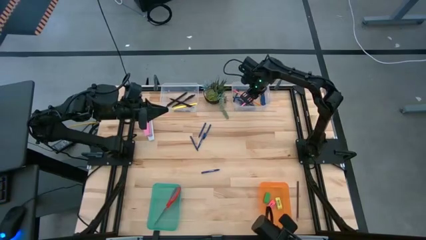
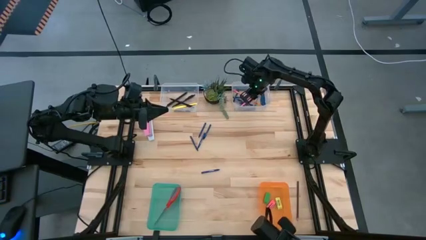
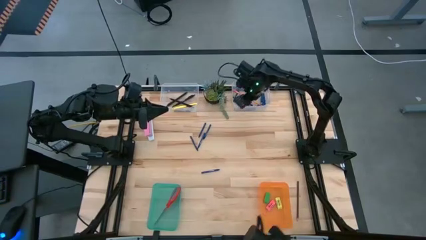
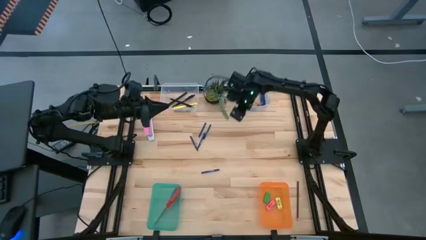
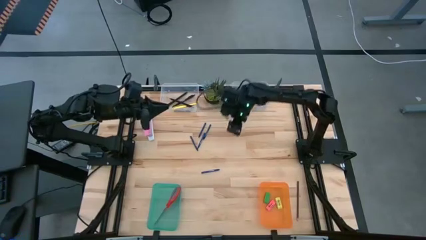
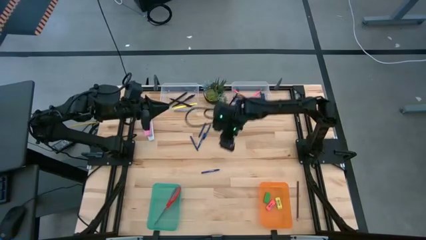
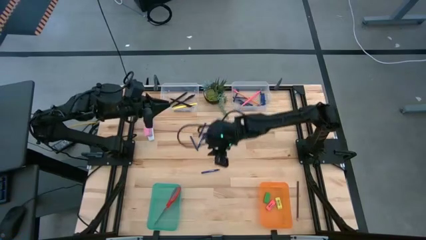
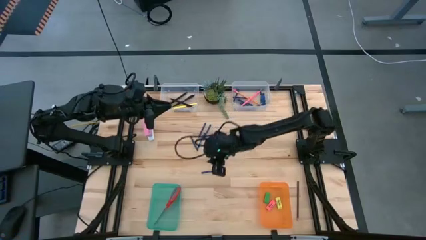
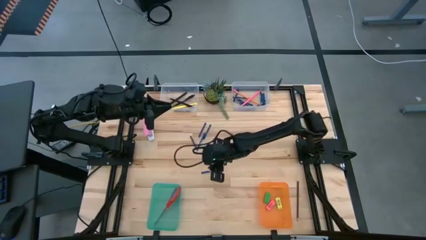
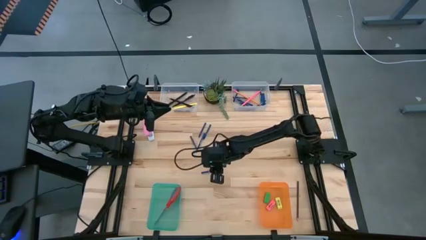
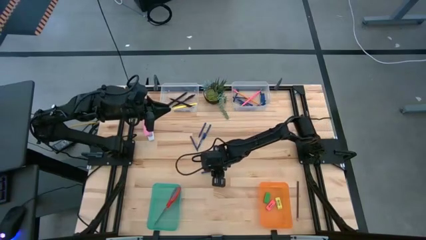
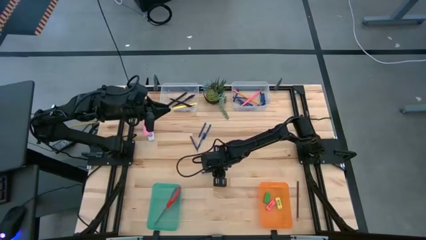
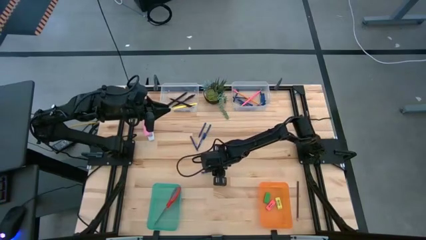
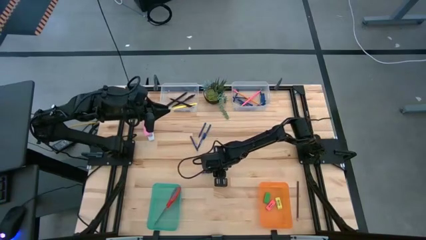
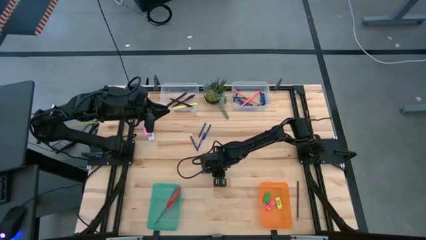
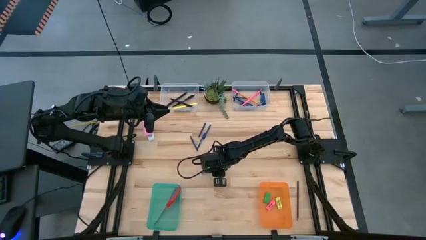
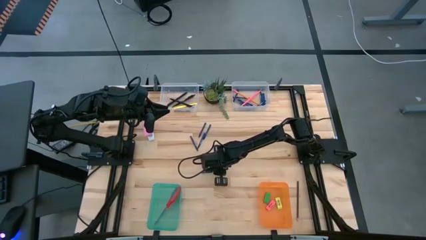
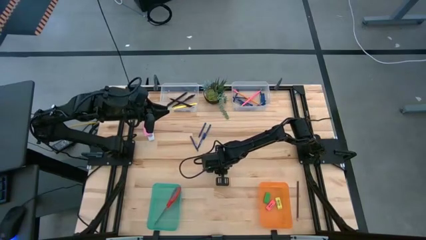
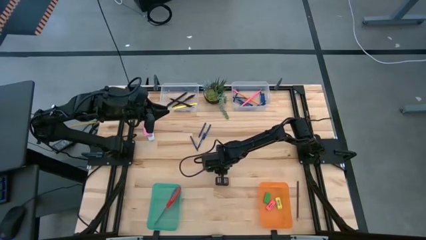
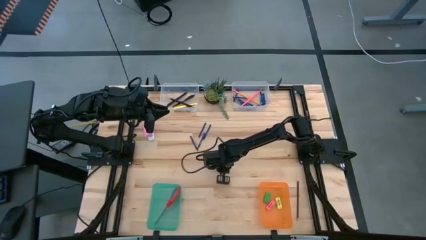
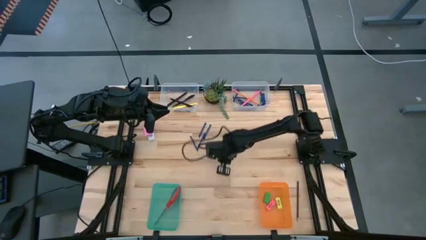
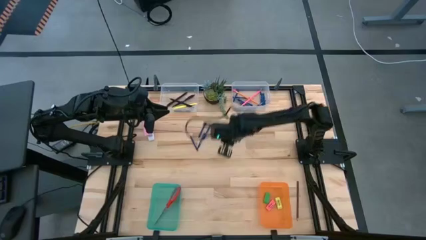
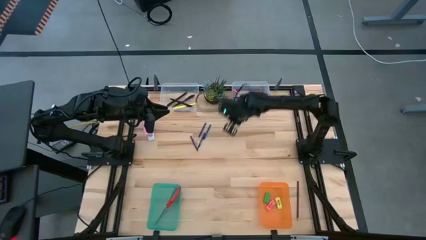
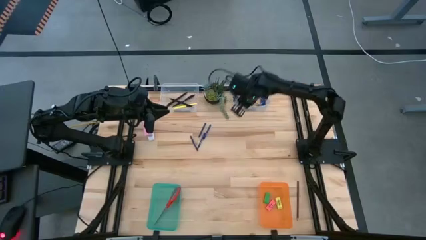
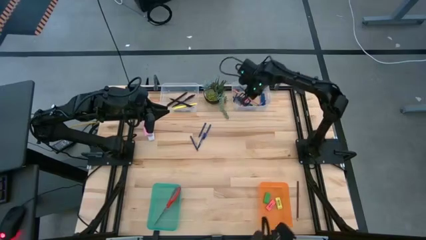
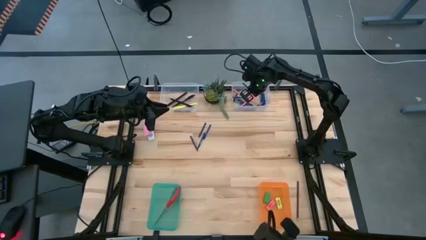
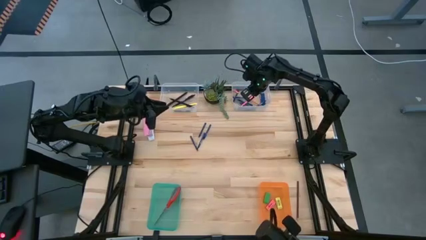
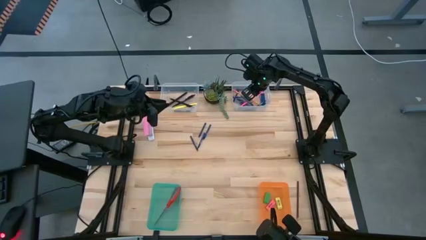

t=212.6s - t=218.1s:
Task: Sort crayons/erasers/pens/pencils in bins
Put the blue crayon into the right transparent bin

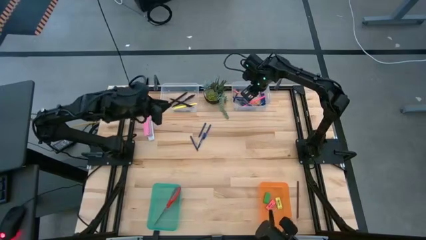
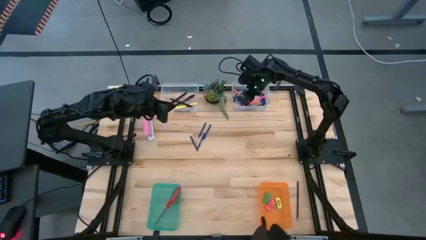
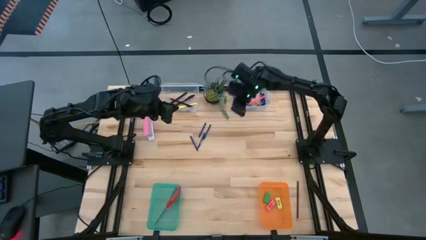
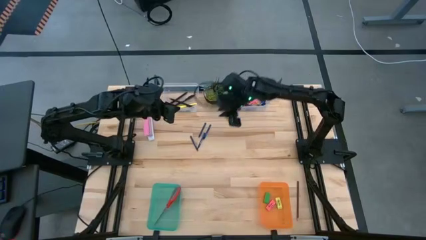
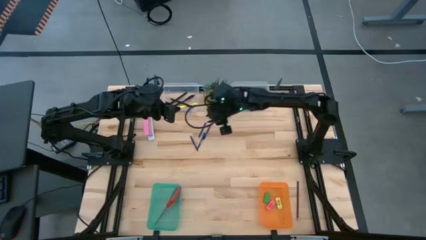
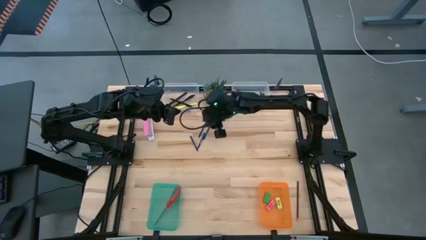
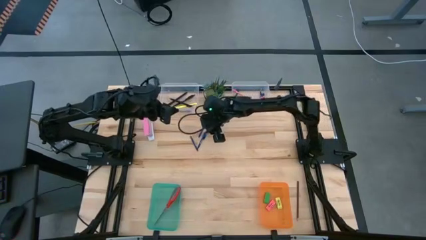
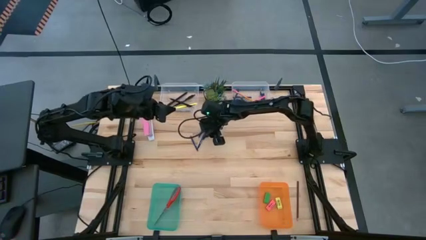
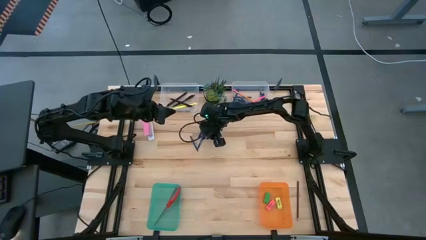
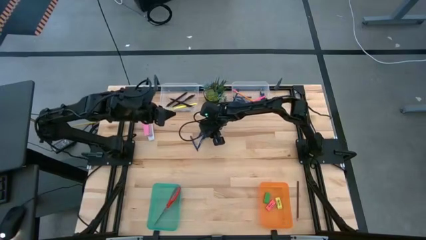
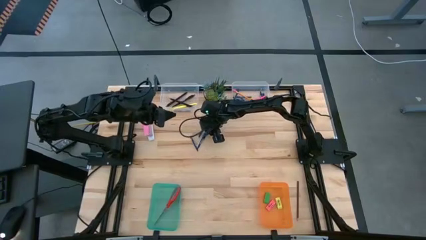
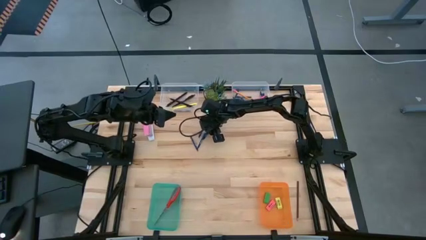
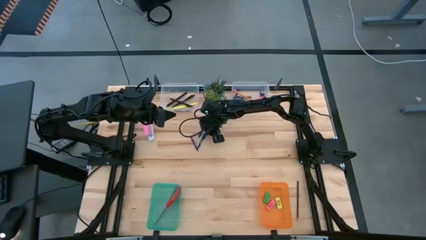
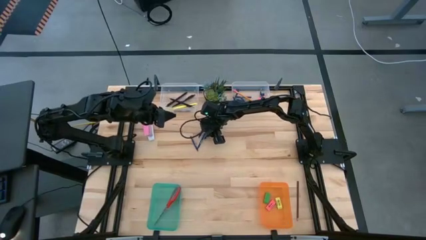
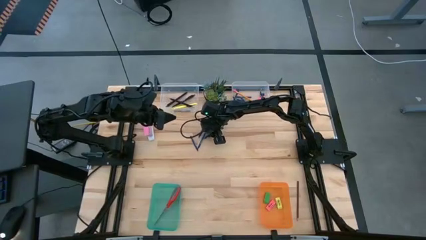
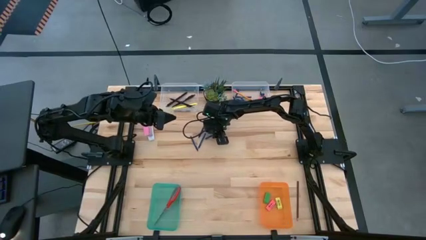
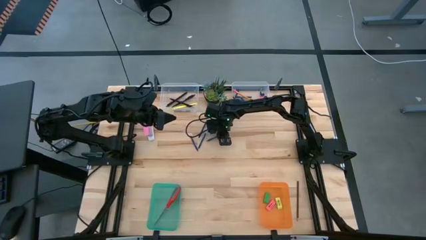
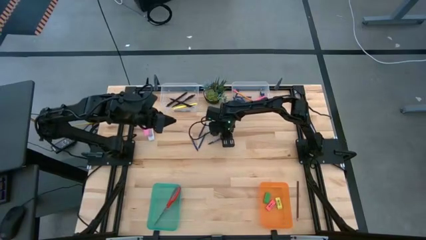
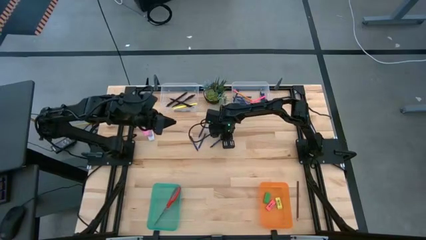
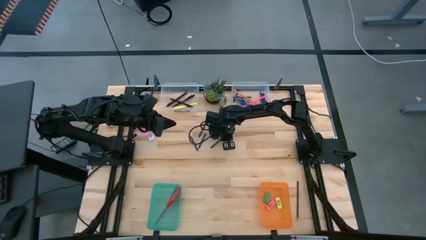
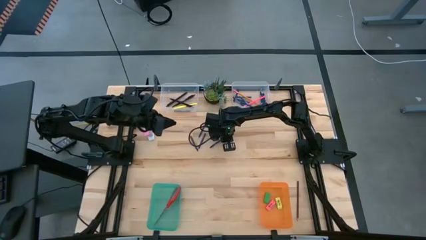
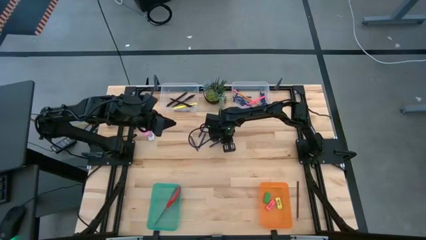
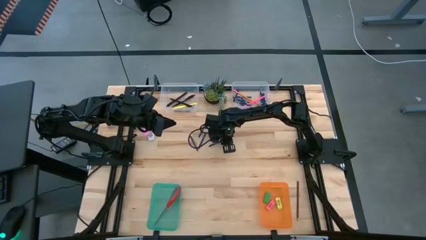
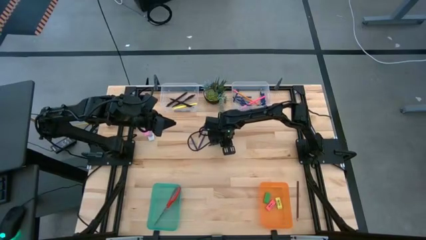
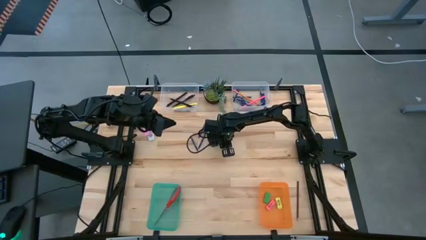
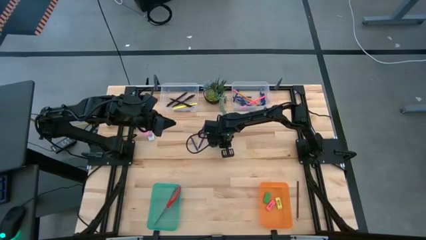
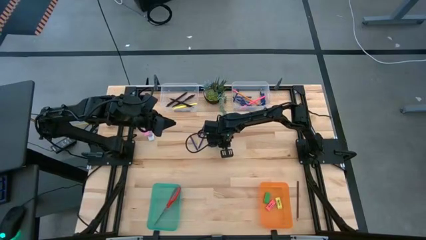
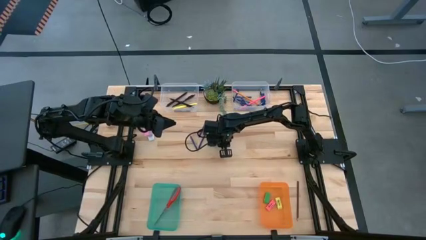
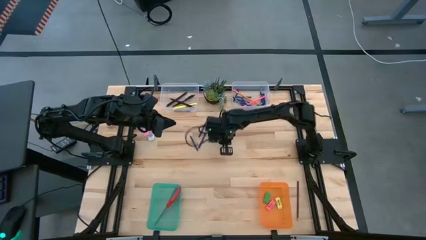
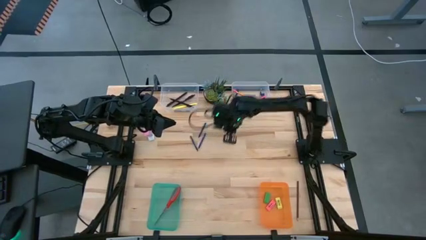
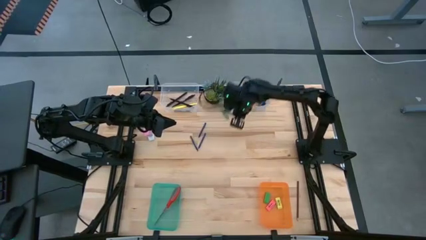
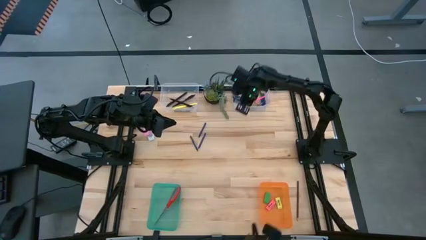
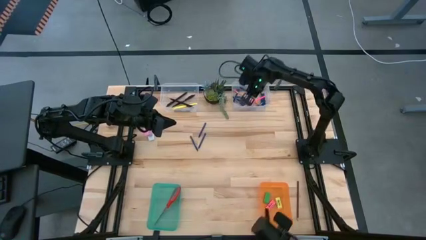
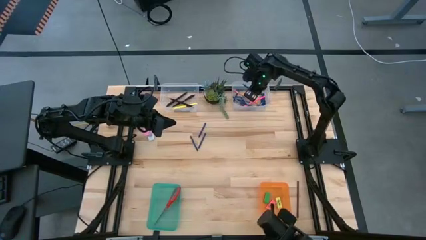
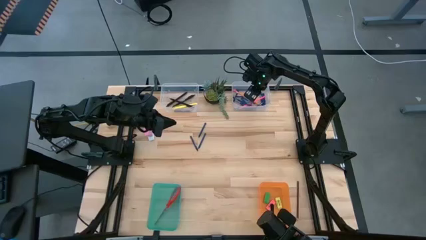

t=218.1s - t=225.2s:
Put the blue crayon into the right transparent bin

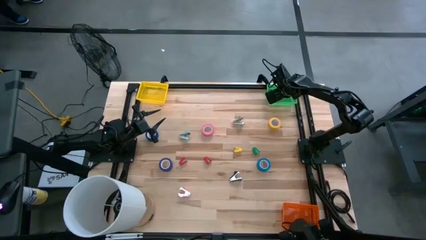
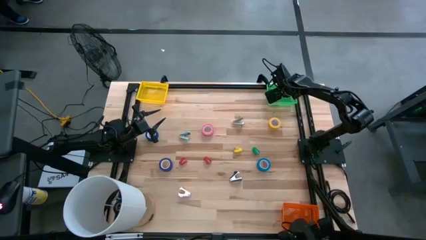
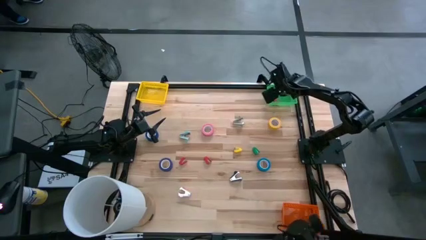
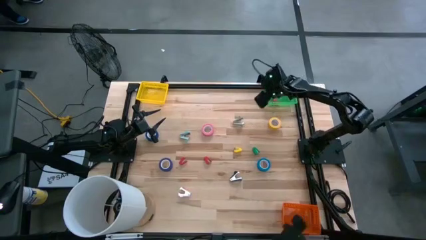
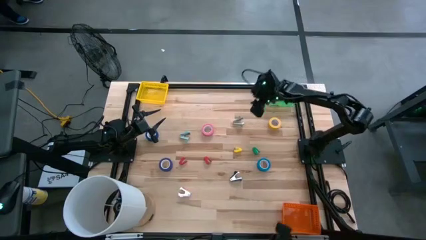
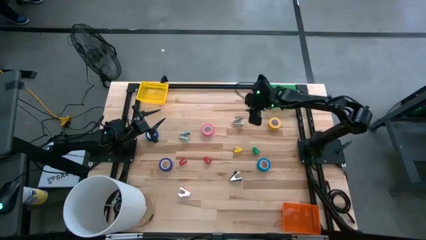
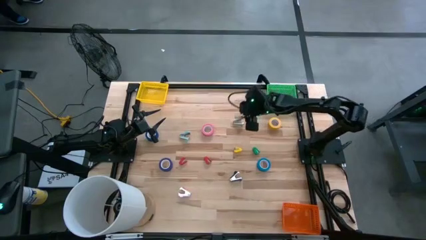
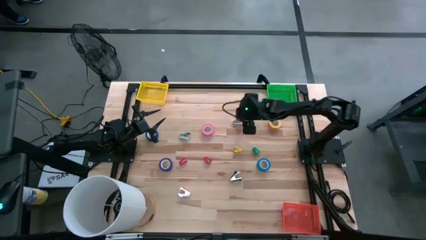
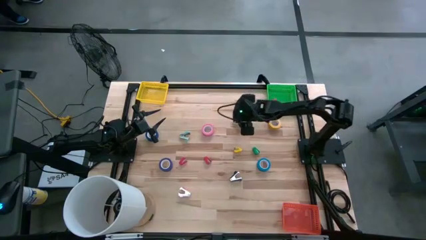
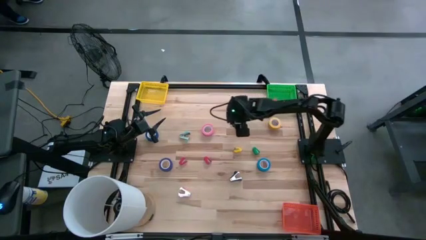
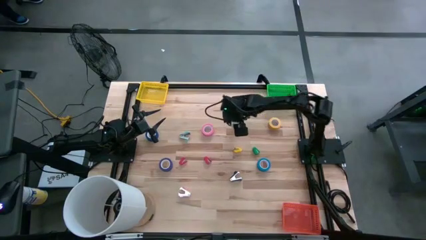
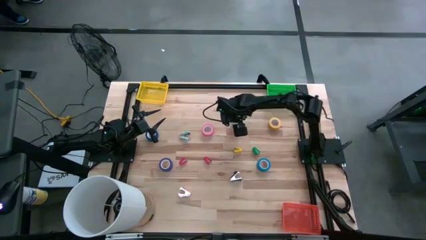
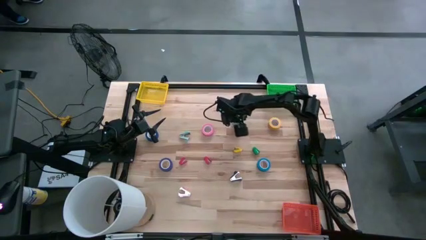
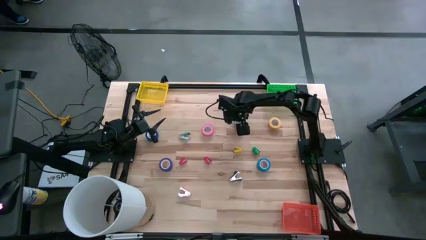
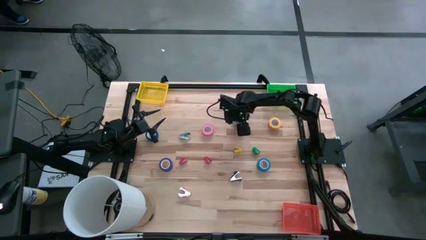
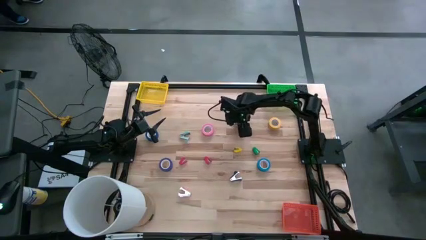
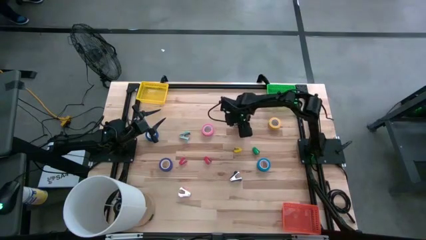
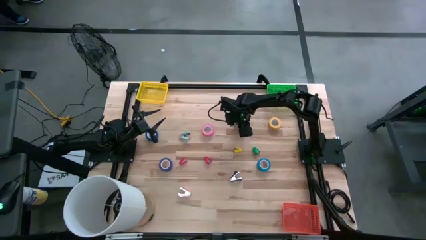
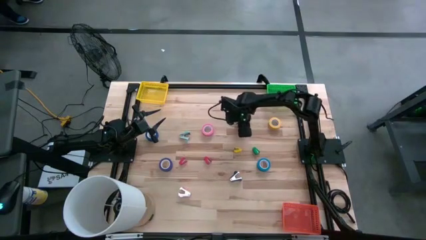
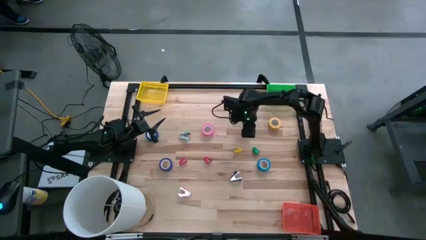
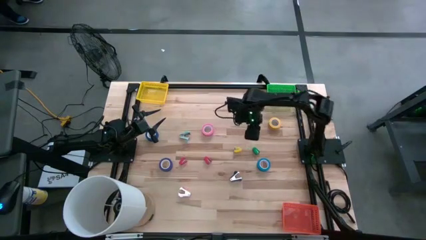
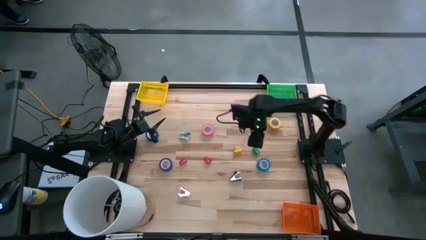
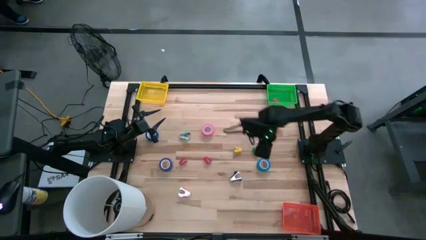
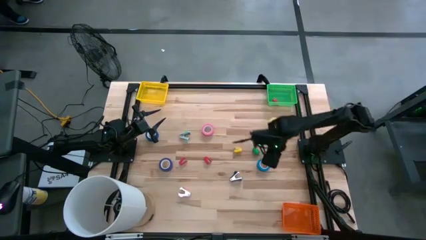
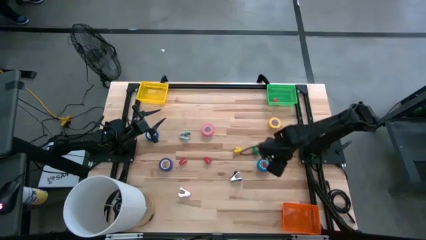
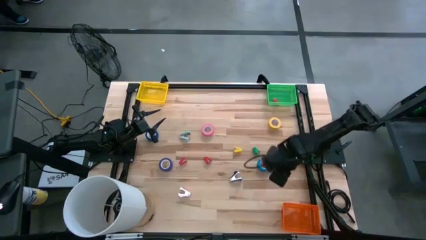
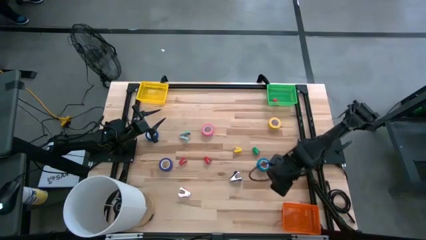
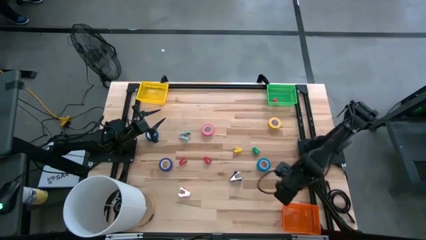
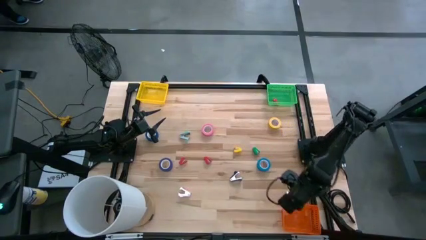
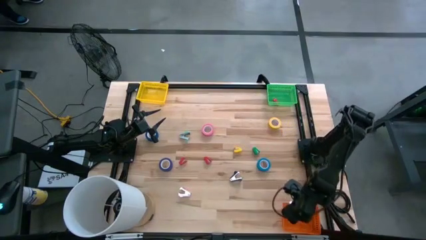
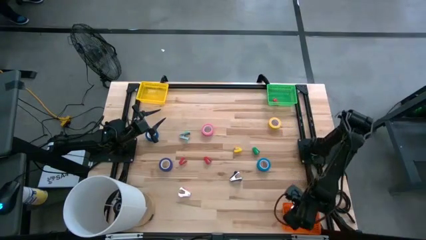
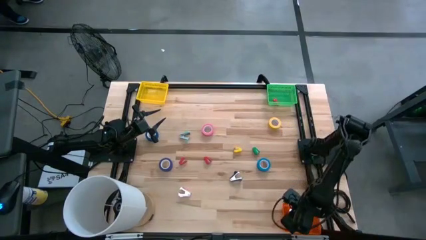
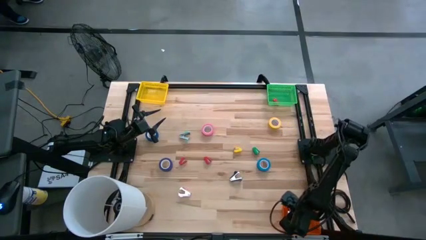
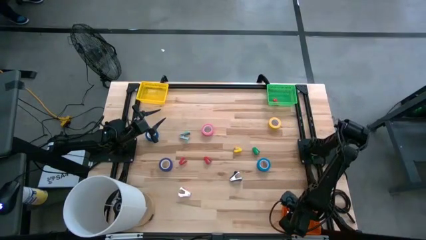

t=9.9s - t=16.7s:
Task: Pick and place Stapler, Stapler remover, tape
Put the gray staple remover into the orange bin
